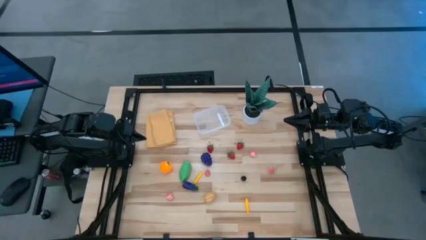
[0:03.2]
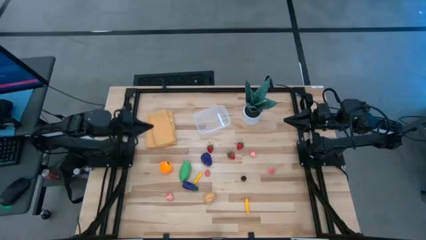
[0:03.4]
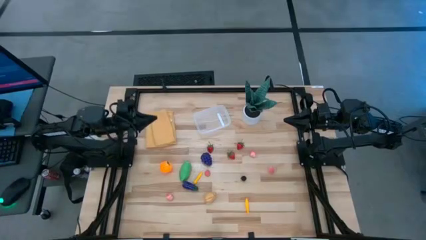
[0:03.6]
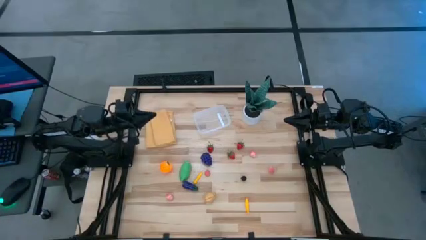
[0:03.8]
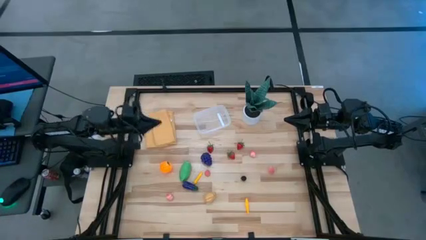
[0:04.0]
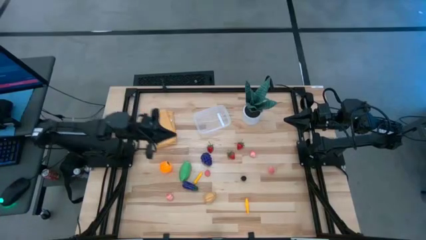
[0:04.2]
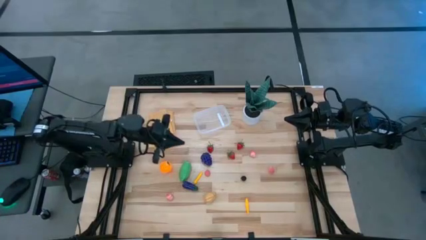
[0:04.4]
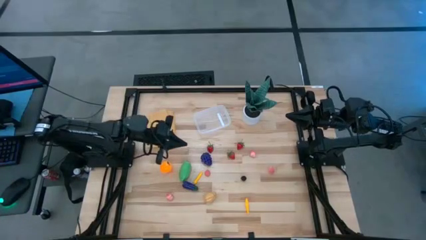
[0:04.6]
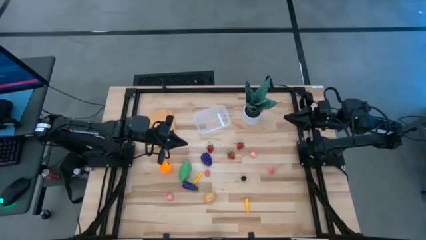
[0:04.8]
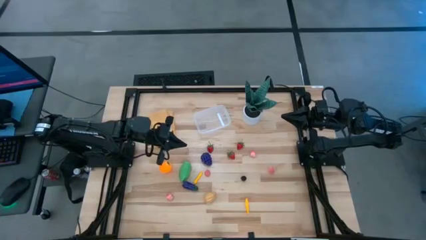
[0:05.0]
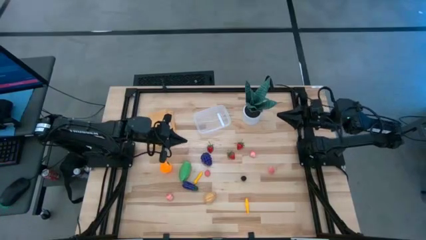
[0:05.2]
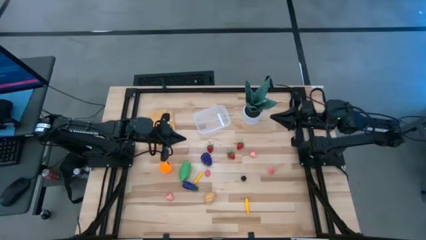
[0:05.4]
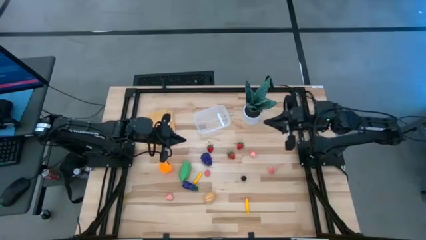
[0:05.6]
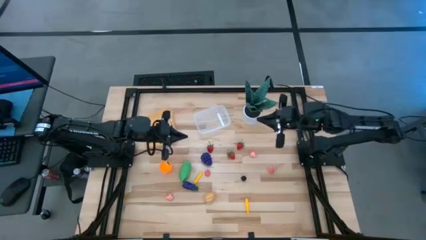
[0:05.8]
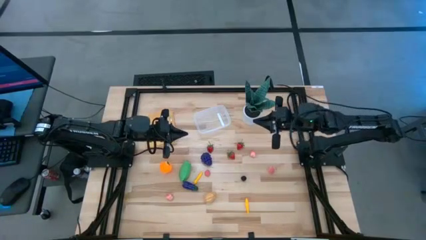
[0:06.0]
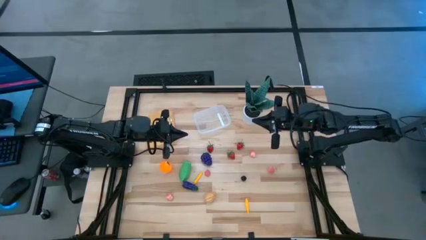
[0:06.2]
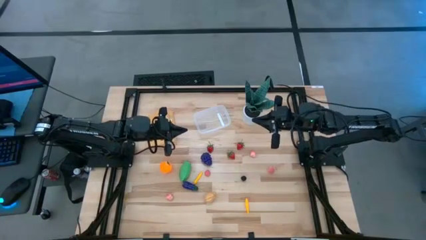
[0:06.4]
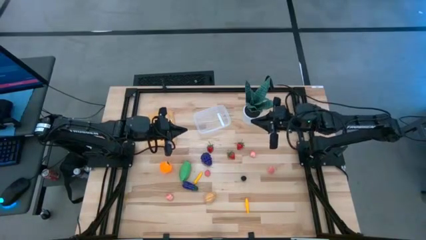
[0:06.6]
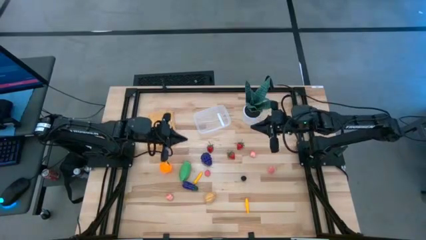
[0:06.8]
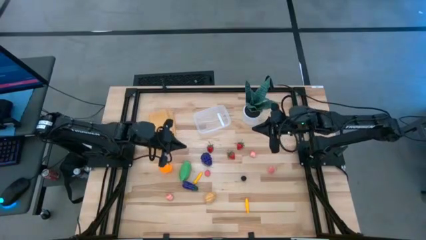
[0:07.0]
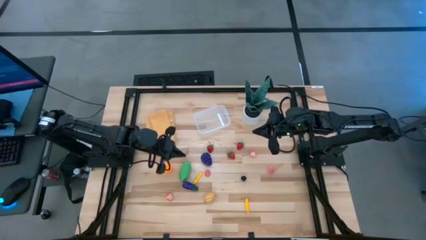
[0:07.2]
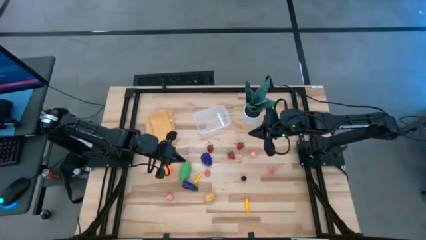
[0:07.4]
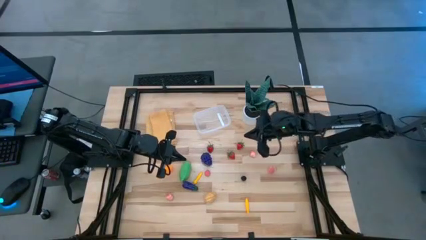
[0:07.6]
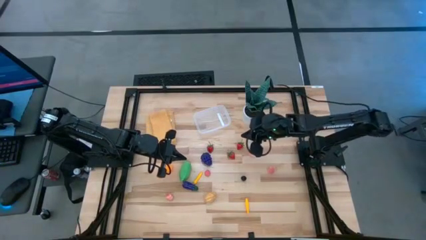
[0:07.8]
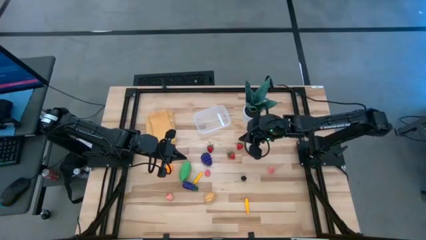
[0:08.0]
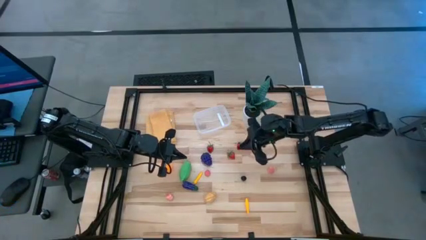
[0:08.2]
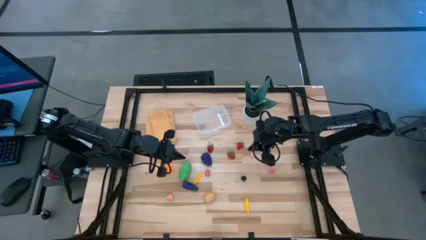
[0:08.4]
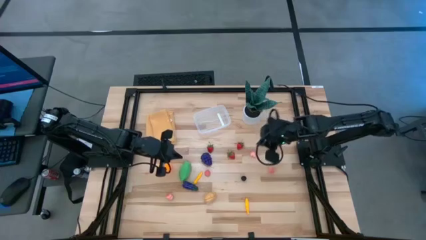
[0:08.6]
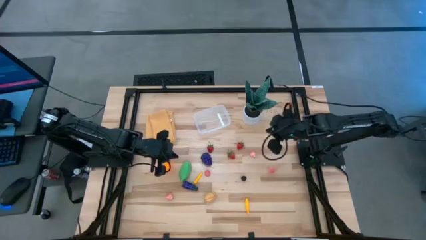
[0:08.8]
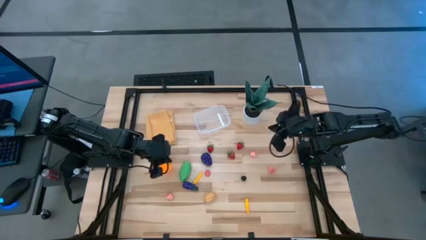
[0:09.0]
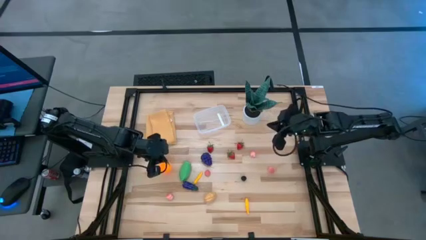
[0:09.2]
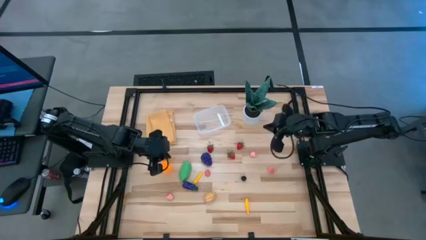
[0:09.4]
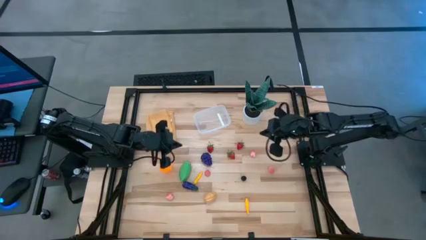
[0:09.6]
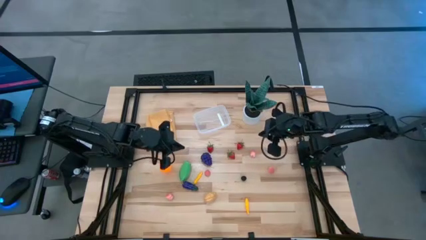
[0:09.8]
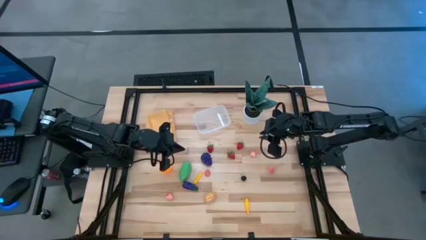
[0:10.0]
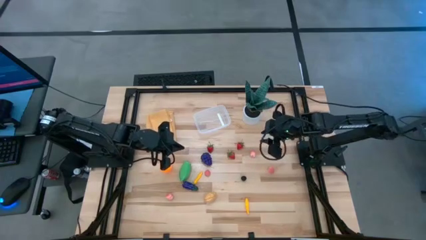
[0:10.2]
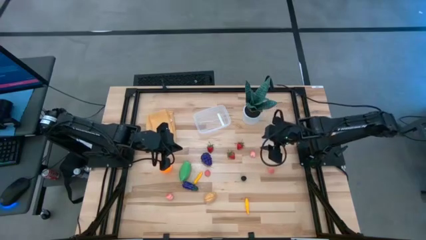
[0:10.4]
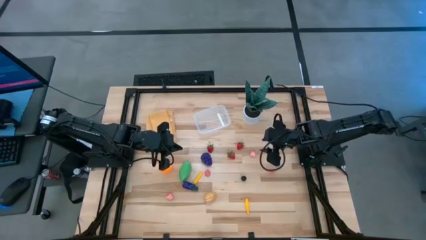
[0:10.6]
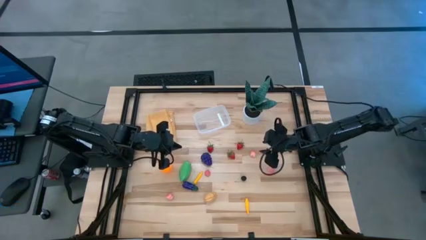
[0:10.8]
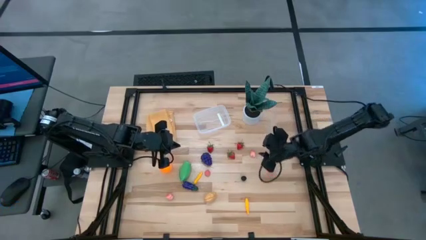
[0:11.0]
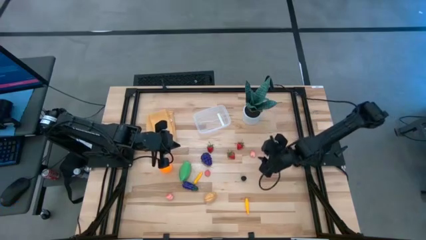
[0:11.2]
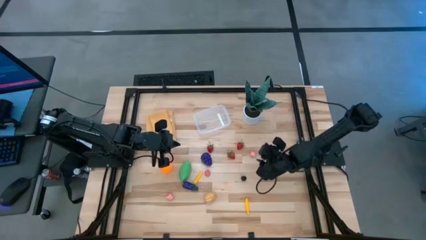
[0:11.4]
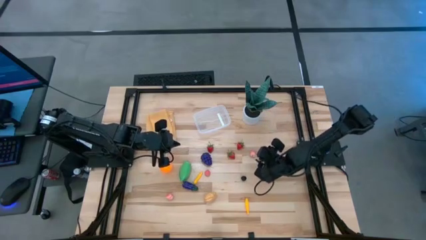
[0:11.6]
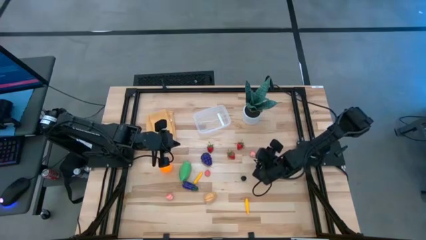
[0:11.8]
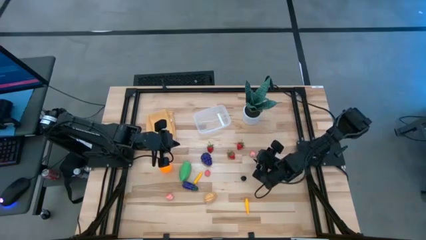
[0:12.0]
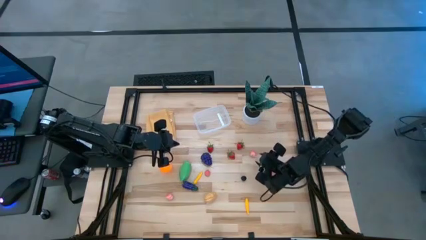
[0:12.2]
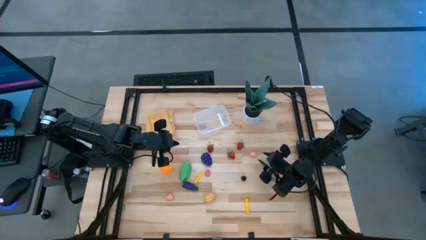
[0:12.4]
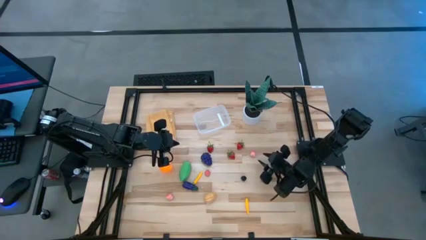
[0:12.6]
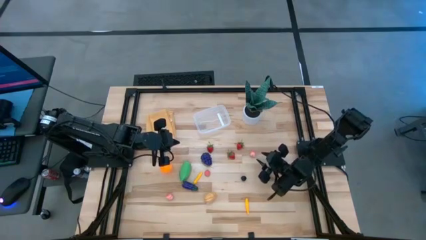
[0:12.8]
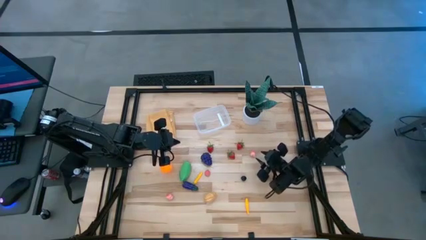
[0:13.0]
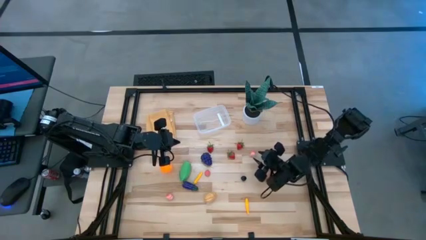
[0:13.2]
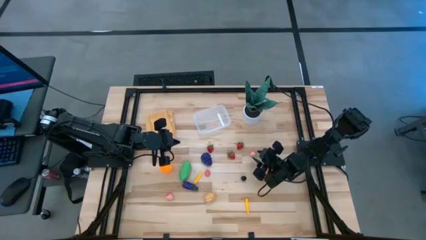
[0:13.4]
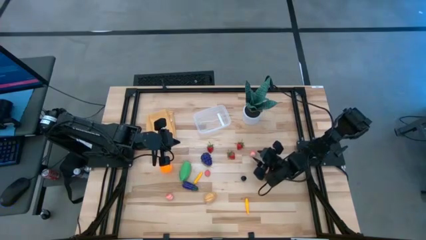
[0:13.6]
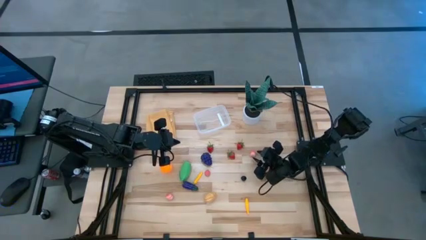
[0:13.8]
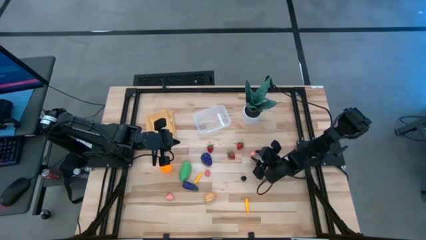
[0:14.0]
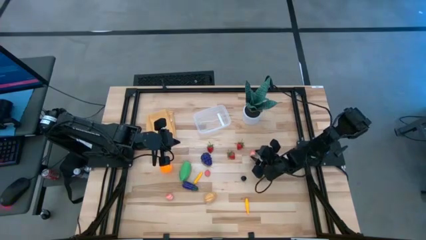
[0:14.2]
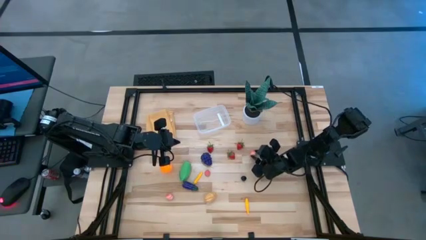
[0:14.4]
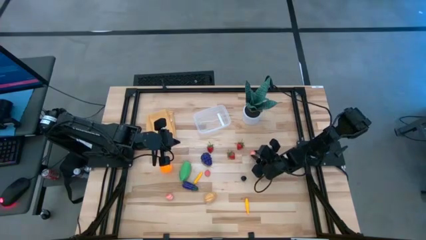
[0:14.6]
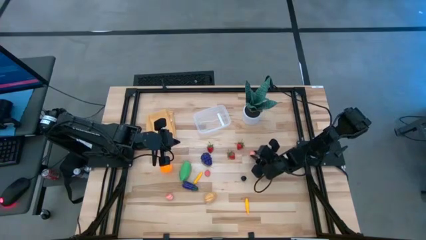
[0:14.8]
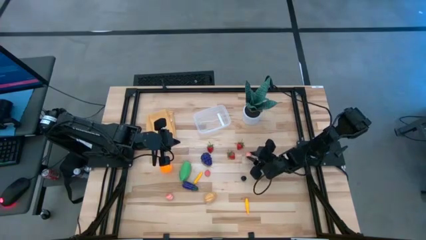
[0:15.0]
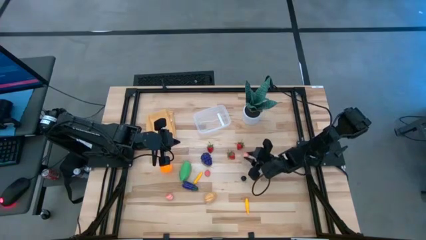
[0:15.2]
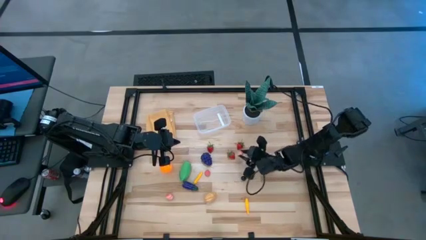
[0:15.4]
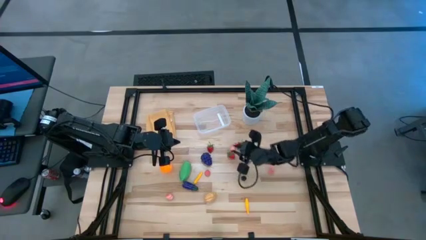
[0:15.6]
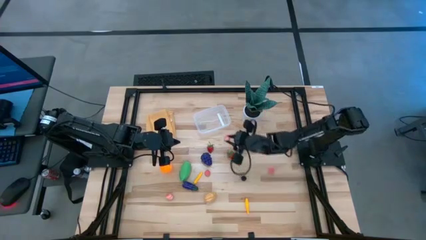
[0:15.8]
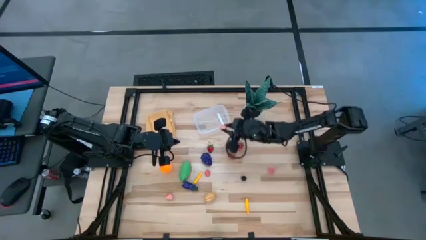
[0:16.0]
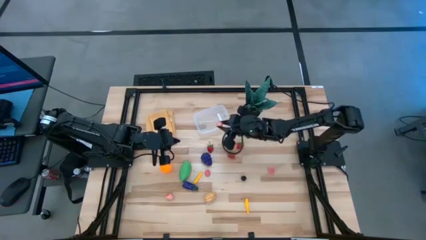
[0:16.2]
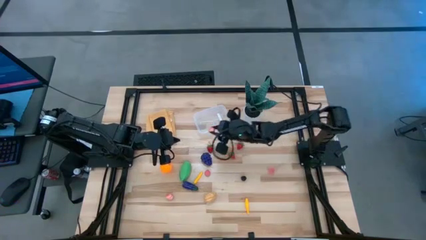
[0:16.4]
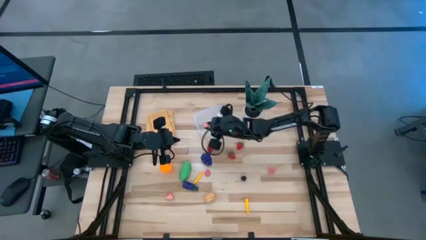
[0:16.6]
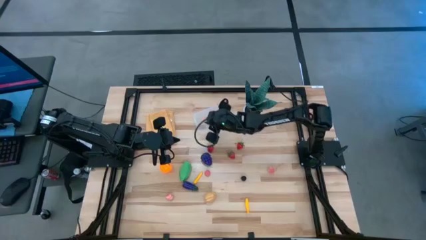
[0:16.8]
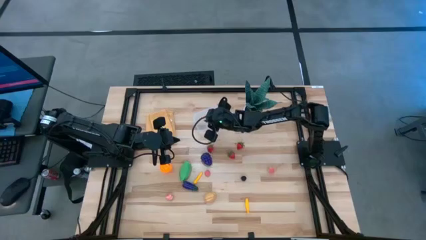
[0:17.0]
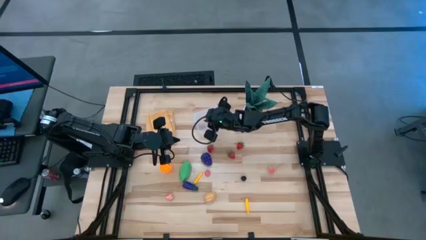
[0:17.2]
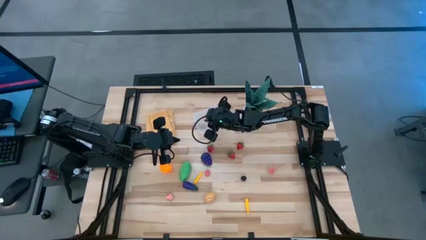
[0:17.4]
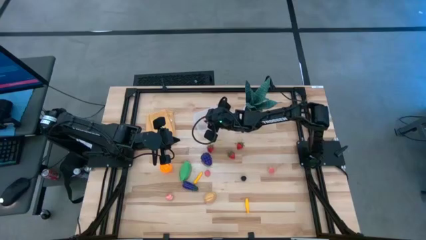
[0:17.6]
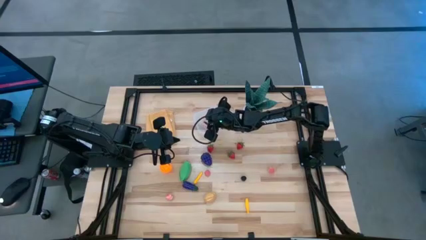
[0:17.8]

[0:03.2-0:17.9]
Task: Pick and placing Produce into tupperware
Put the pink peach into the transparent bin
